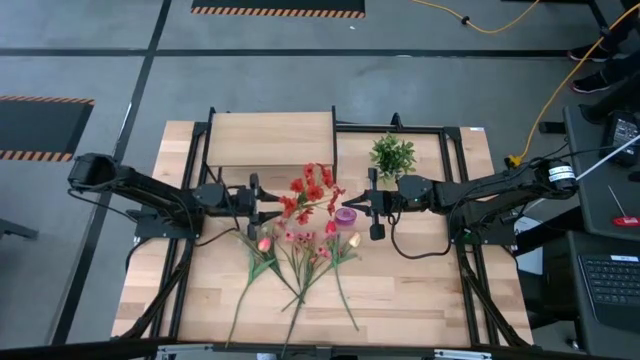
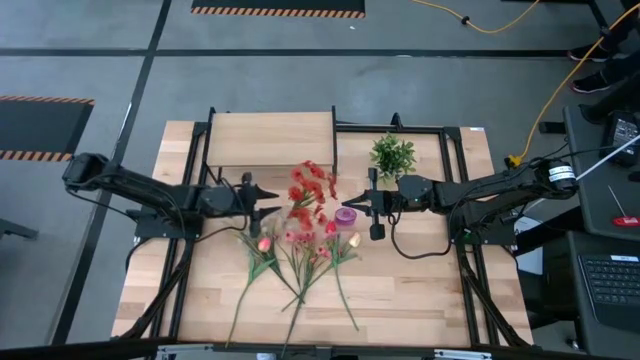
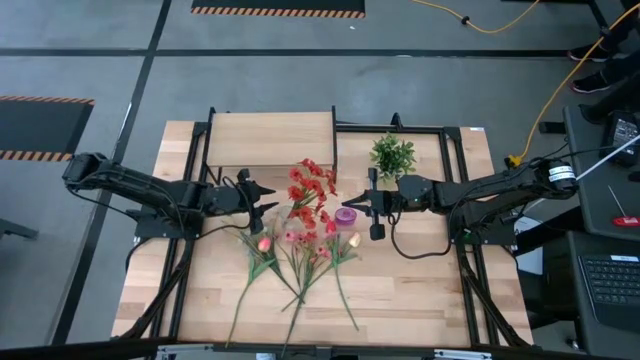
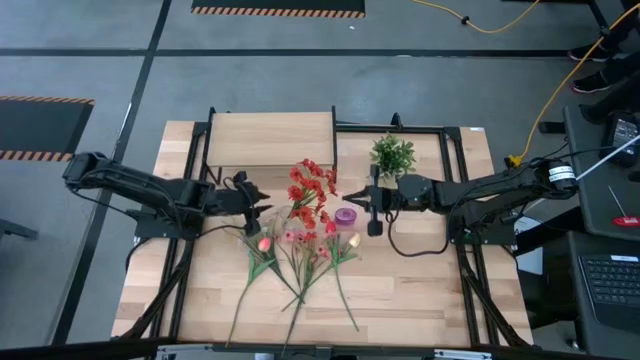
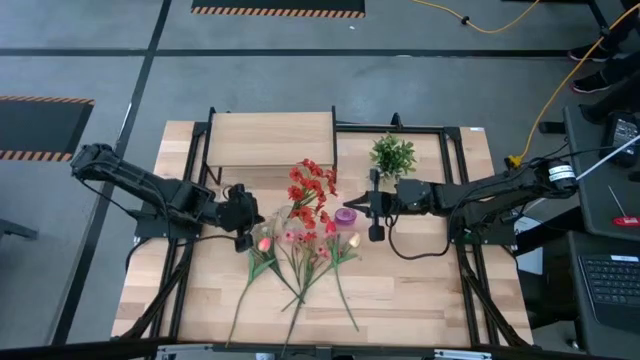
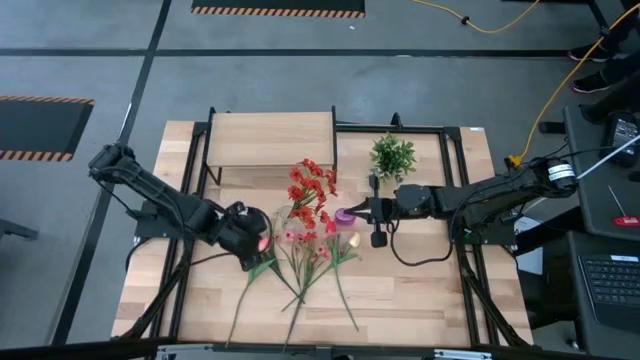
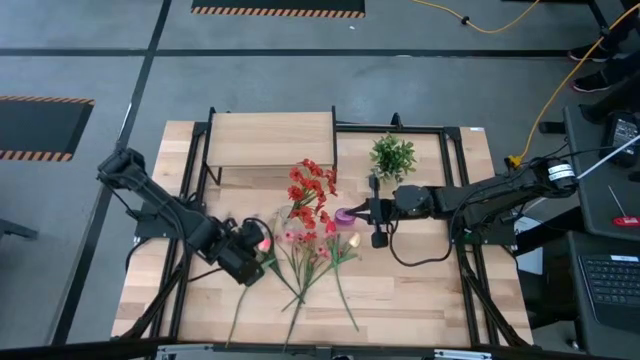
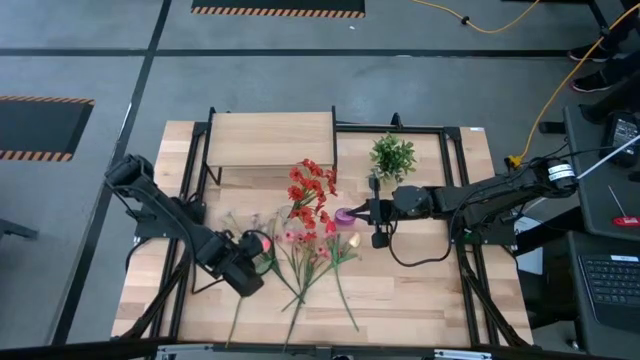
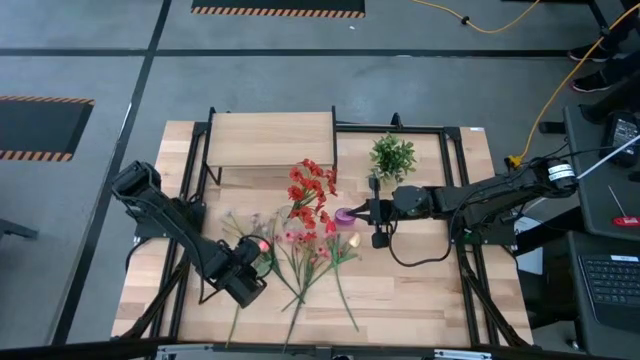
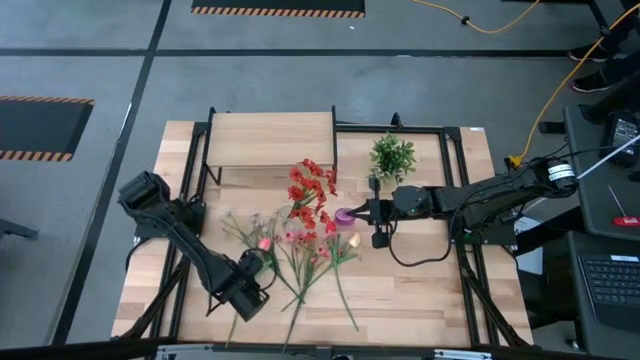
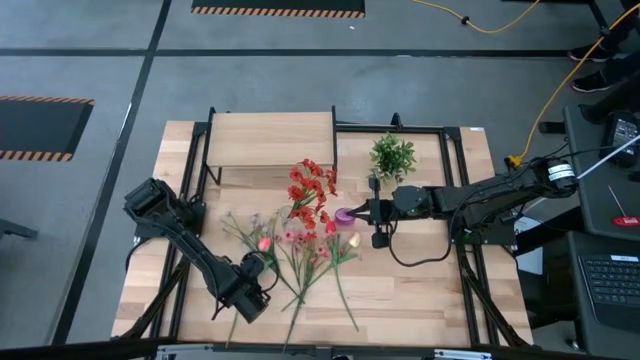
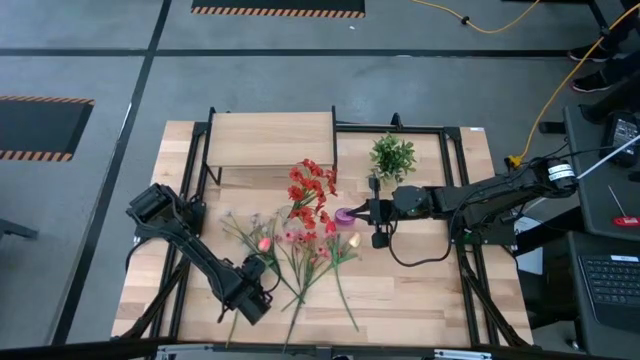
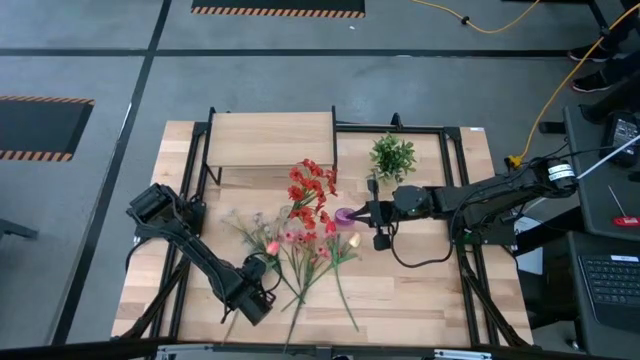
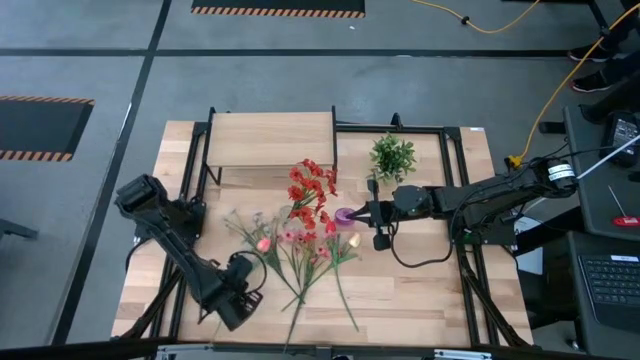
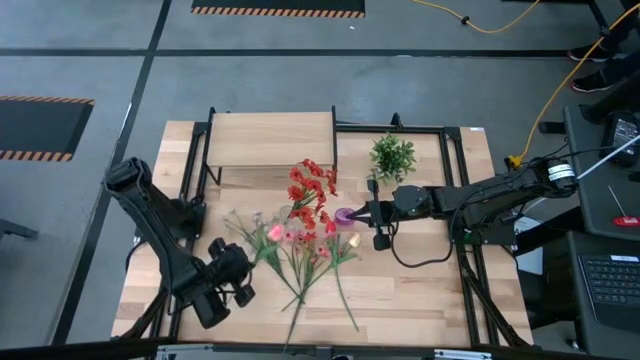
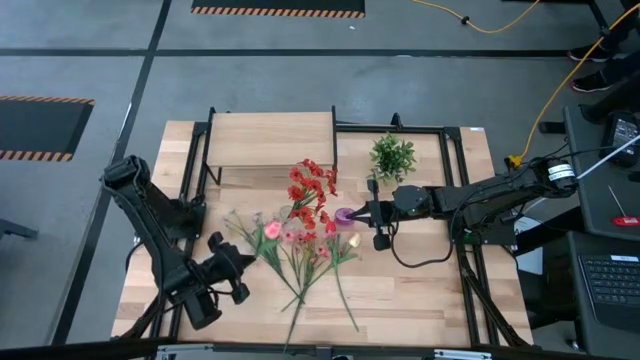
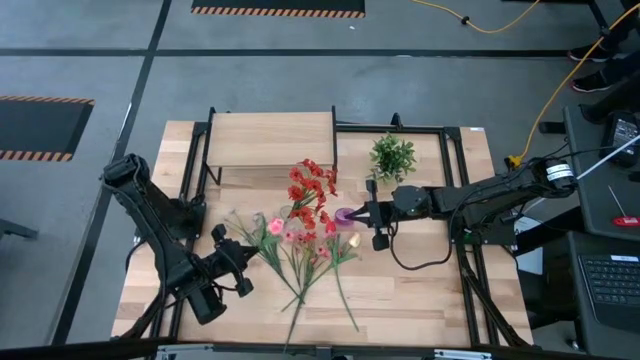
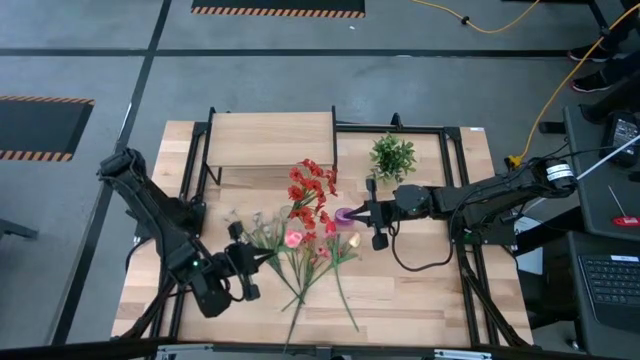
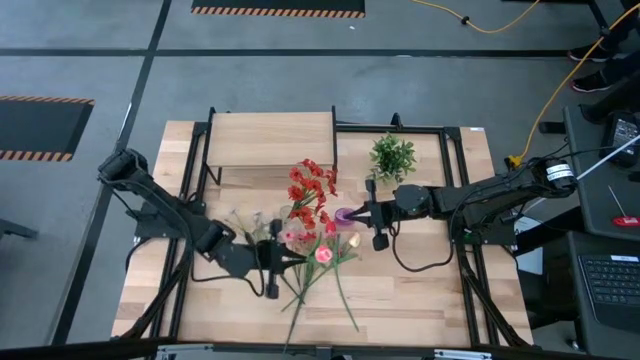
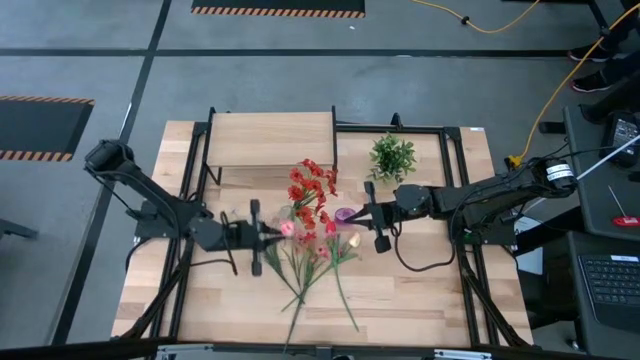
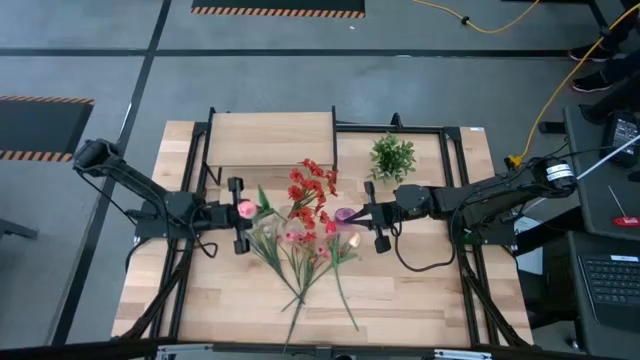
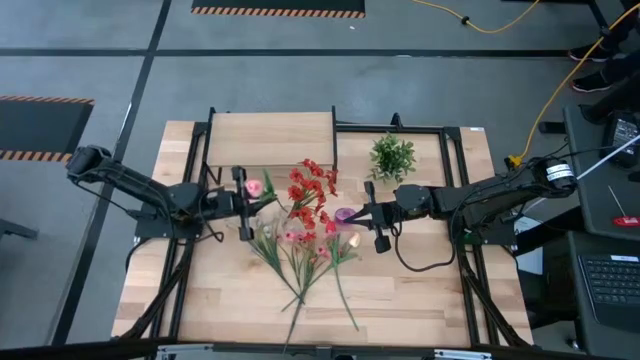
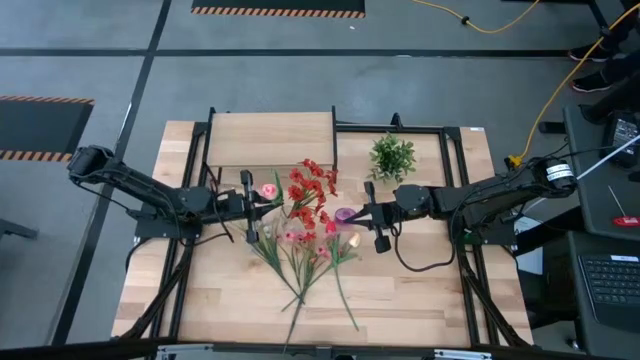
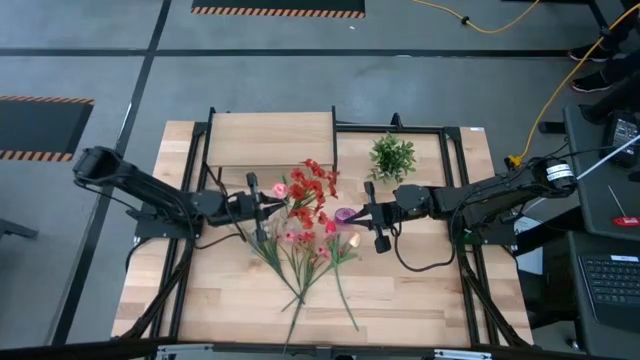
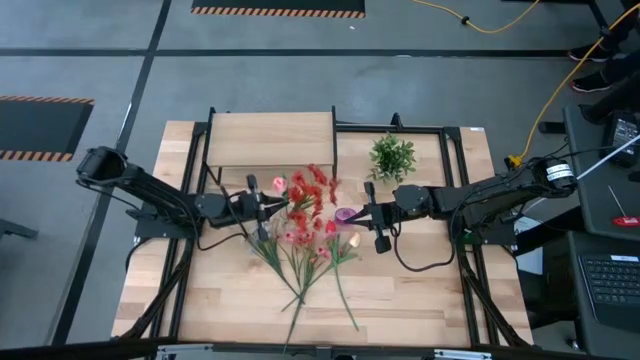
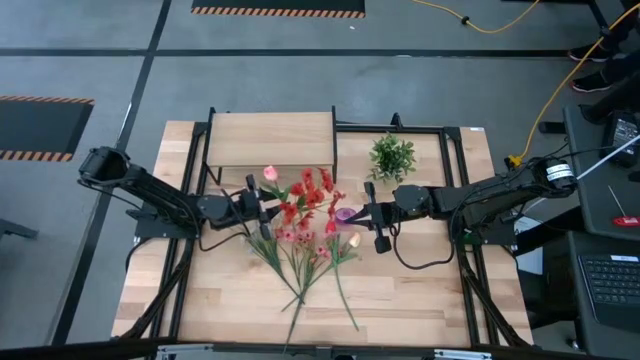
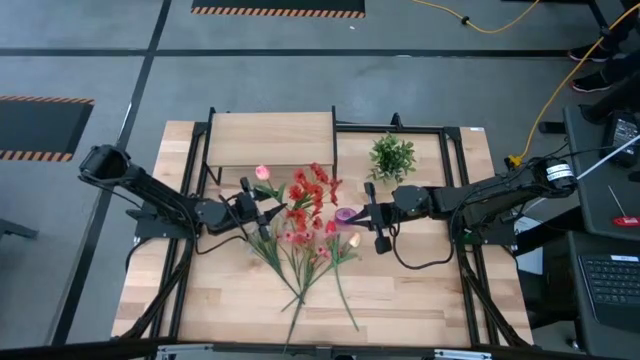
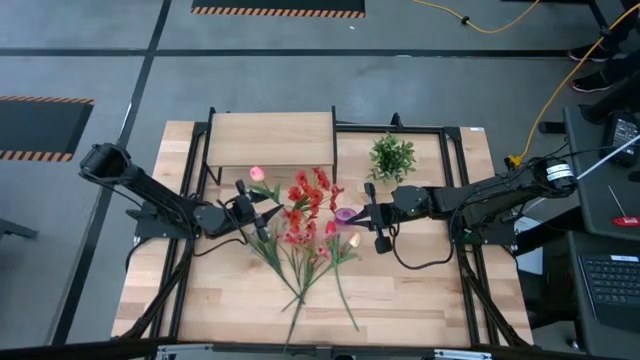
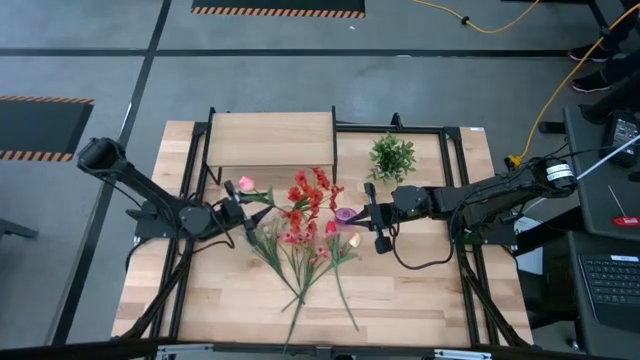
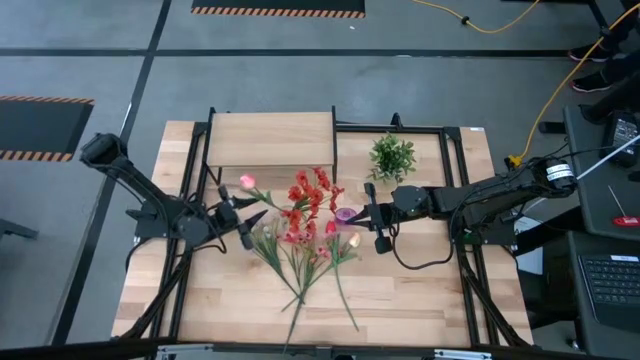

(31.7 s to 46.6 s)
Task: Pick and place flowers into a vace then onto a shelf
Put the pink tulip into the transparent vase

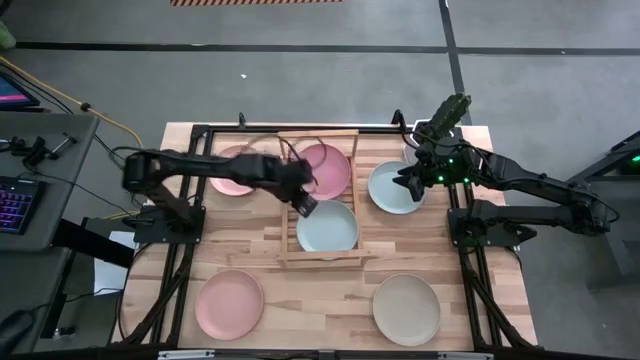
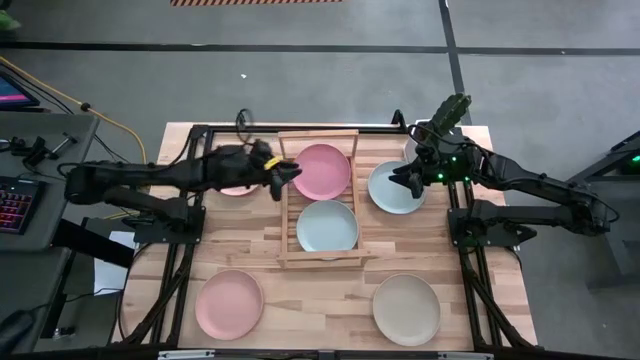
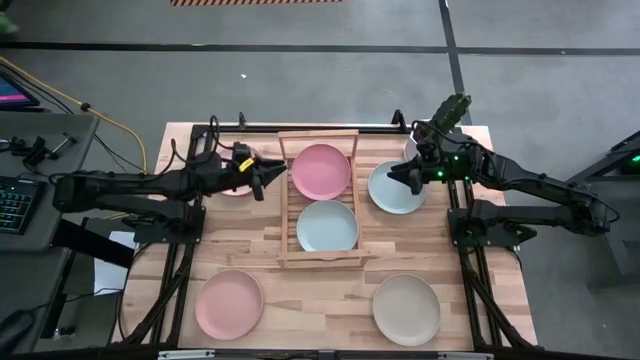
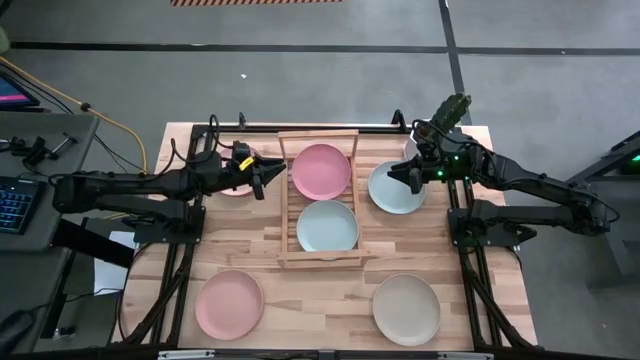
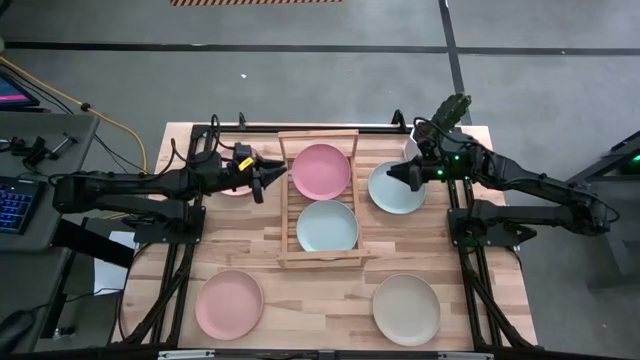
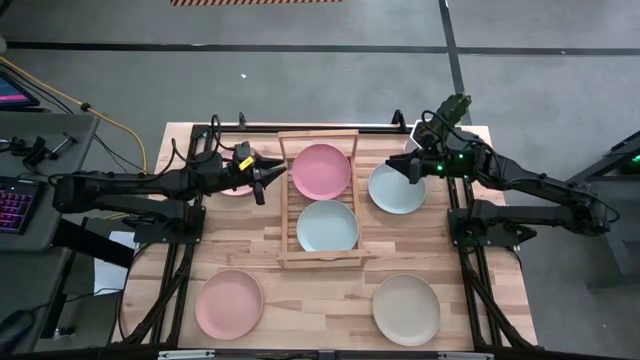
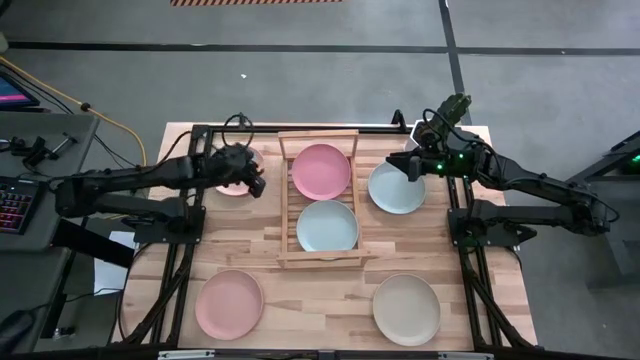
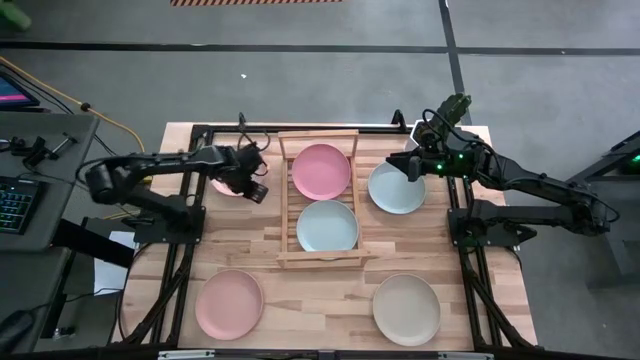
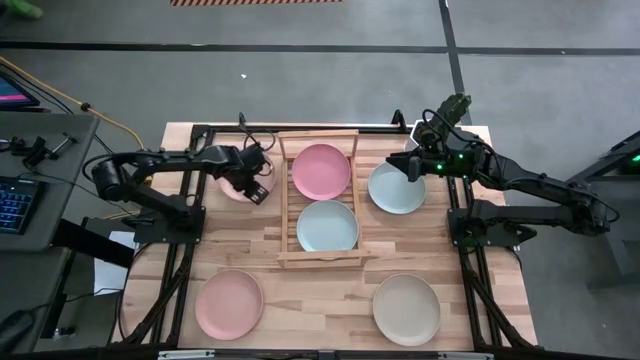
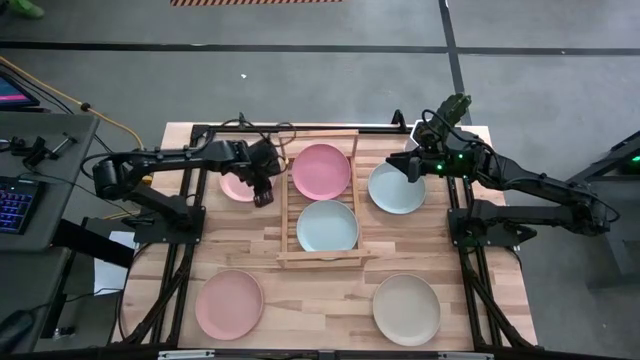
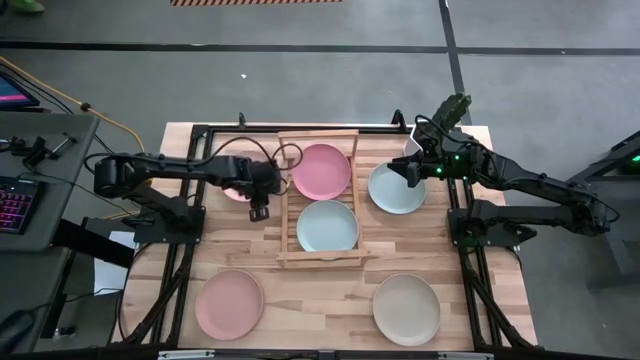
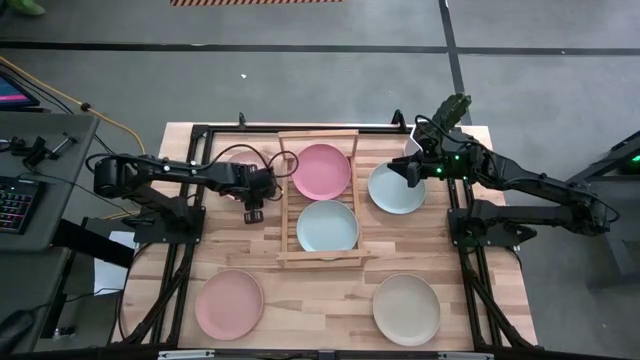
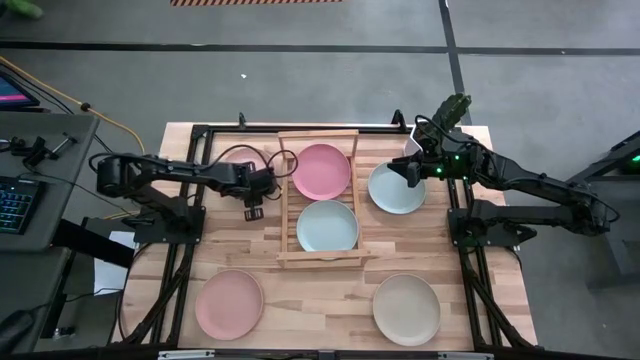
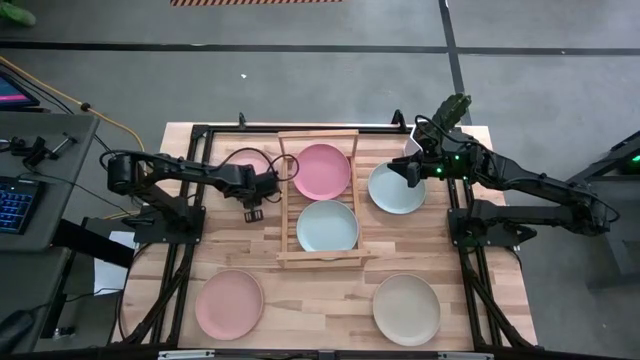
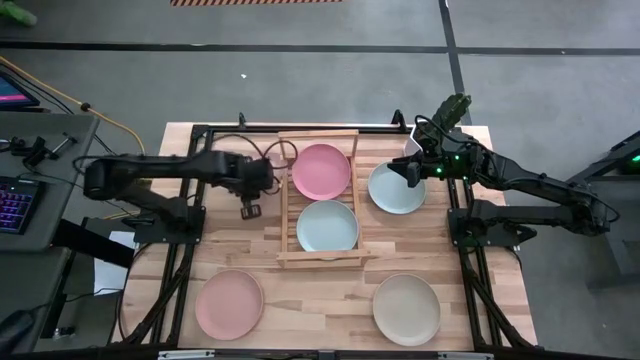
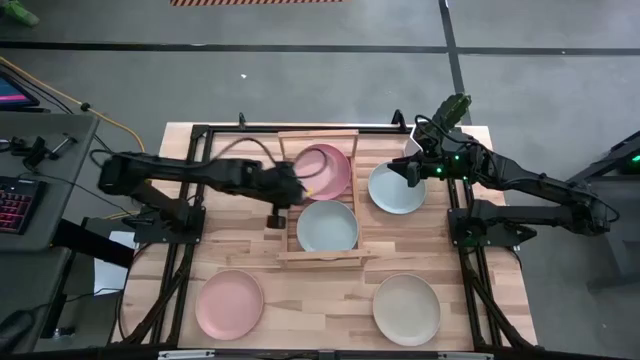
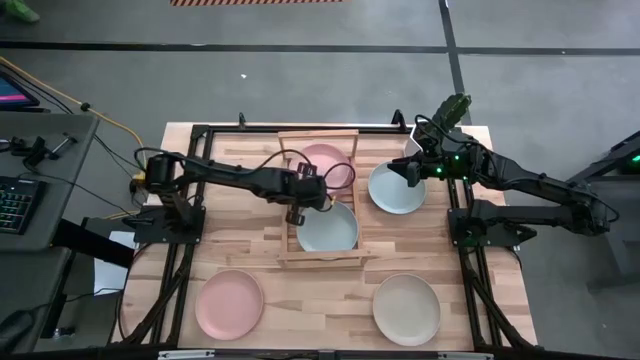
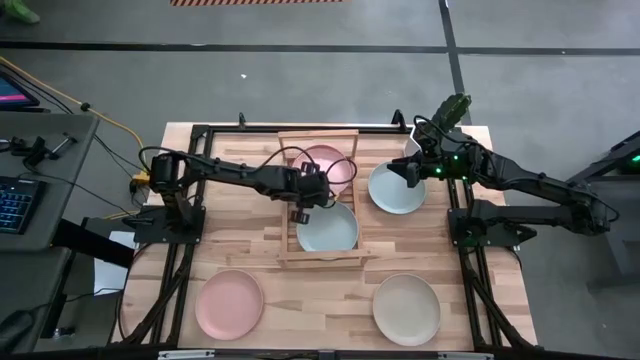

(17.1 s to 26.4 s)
Task: Place and stack plates onto a shelf
Stack the top light pink plate on top of the pink plate on the shelf
